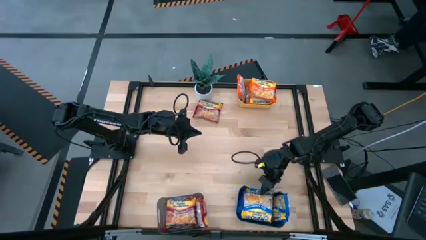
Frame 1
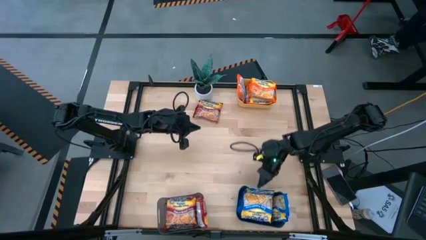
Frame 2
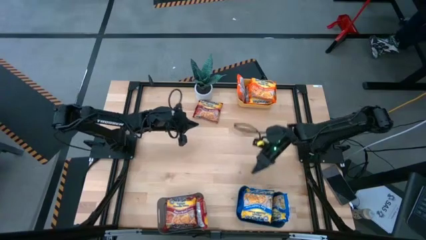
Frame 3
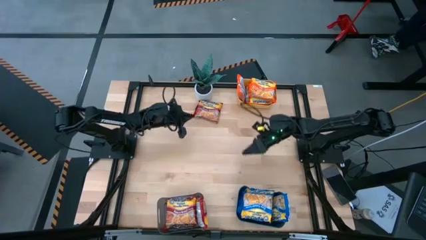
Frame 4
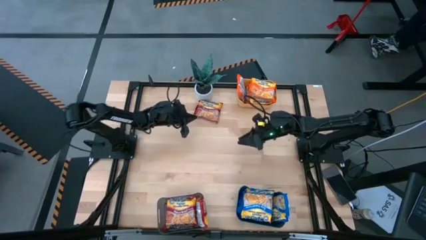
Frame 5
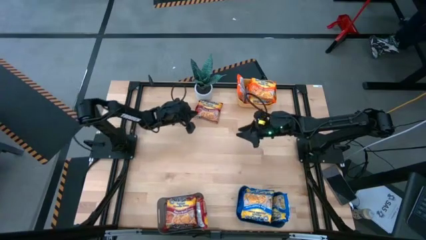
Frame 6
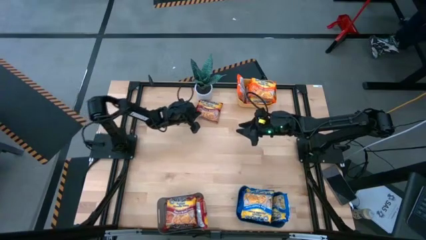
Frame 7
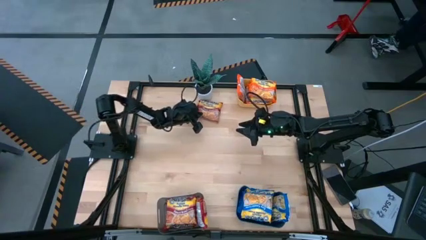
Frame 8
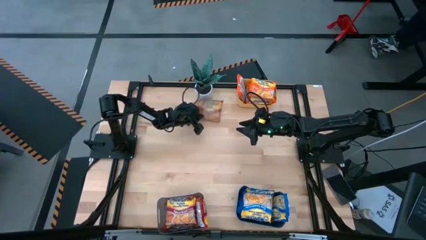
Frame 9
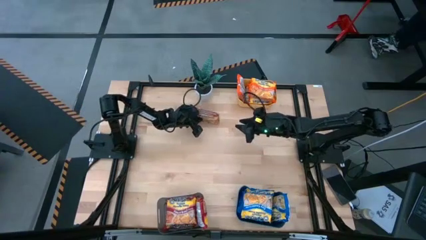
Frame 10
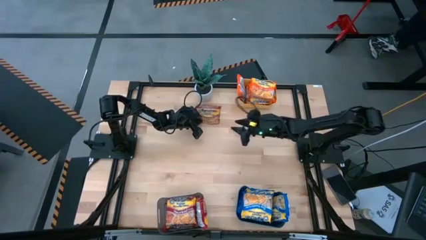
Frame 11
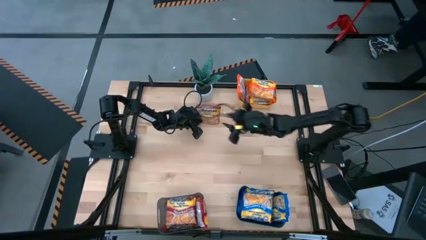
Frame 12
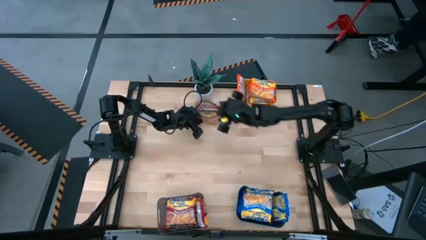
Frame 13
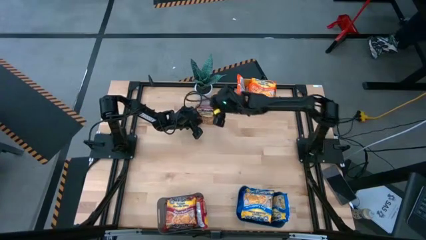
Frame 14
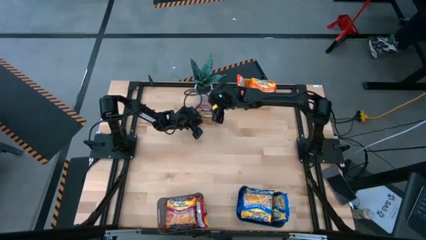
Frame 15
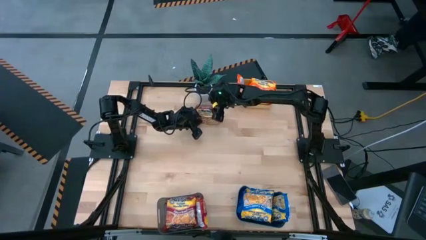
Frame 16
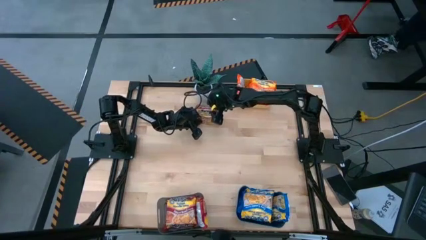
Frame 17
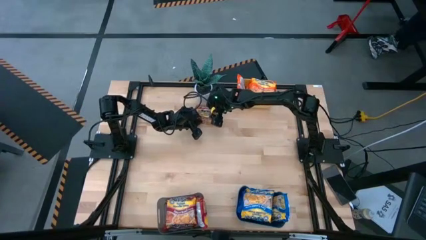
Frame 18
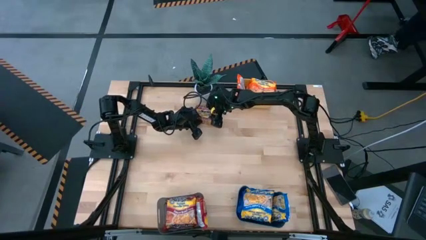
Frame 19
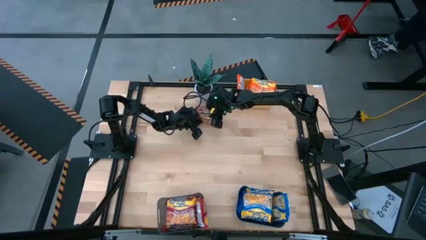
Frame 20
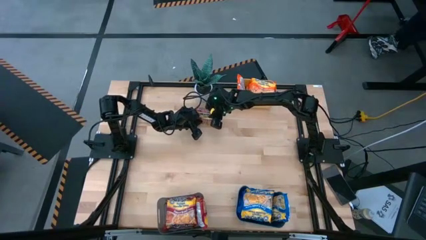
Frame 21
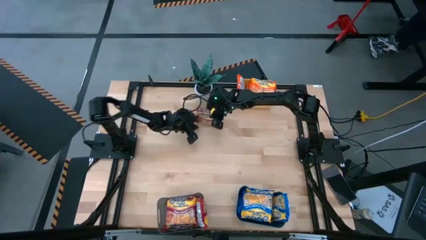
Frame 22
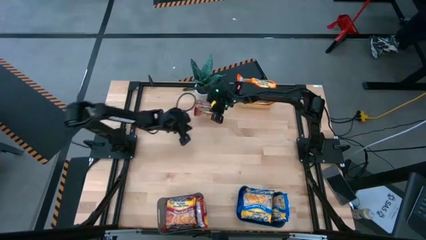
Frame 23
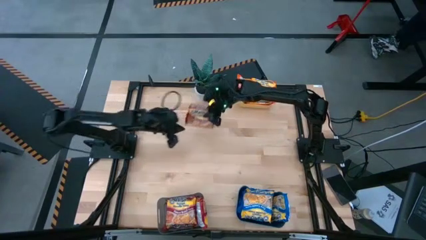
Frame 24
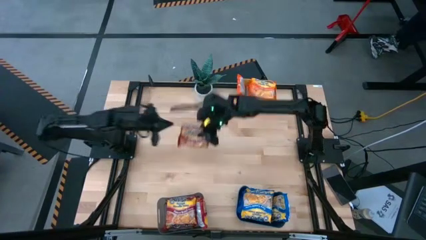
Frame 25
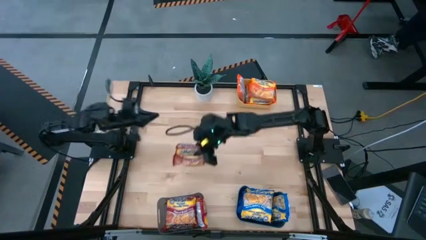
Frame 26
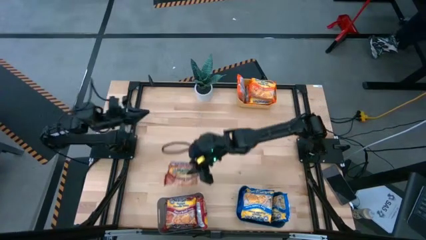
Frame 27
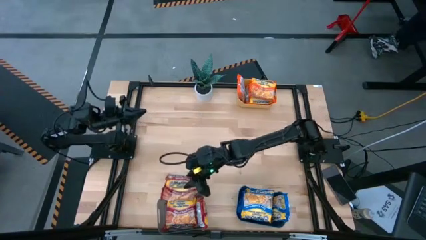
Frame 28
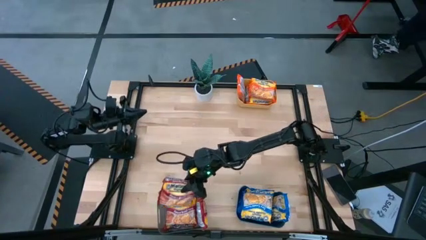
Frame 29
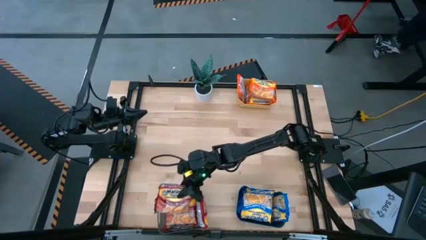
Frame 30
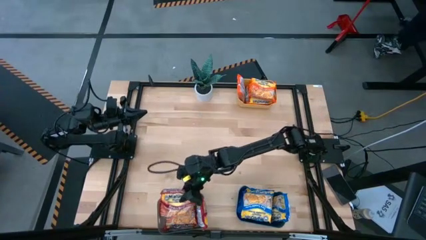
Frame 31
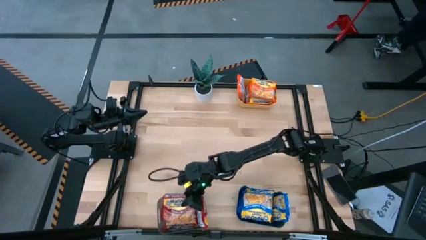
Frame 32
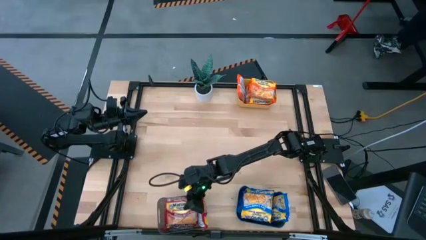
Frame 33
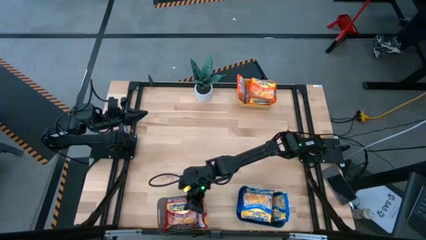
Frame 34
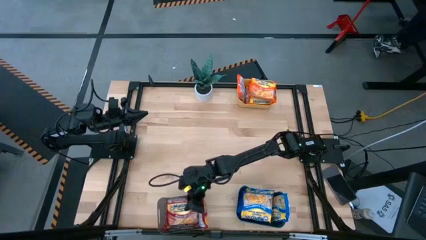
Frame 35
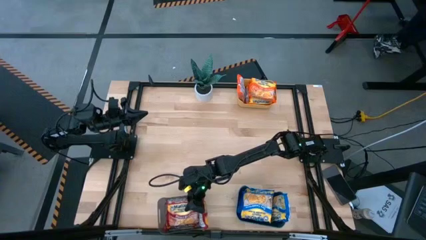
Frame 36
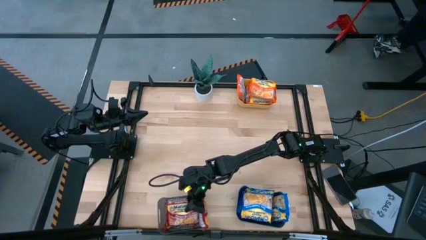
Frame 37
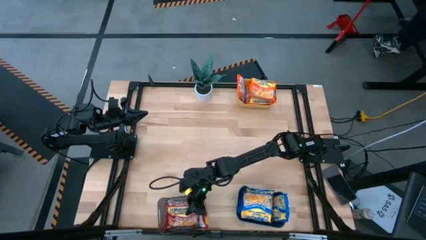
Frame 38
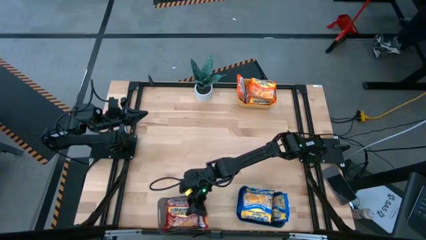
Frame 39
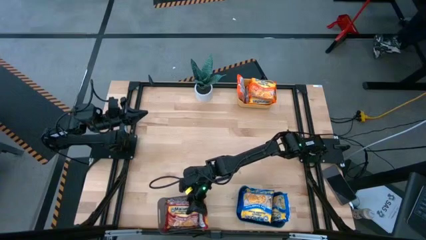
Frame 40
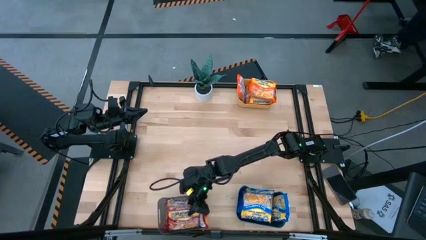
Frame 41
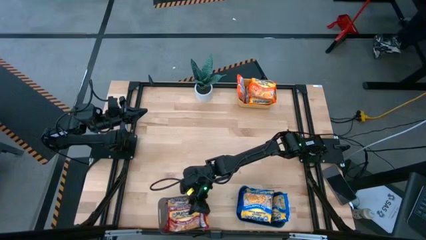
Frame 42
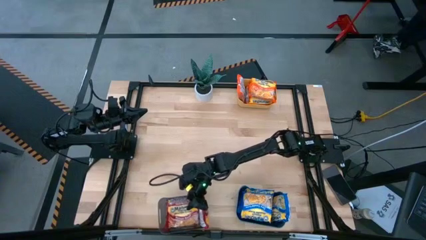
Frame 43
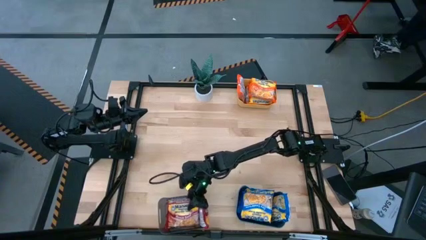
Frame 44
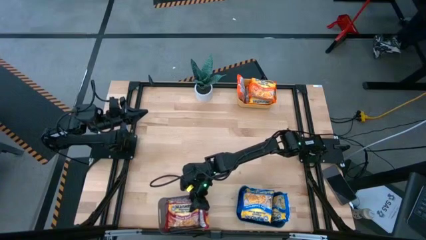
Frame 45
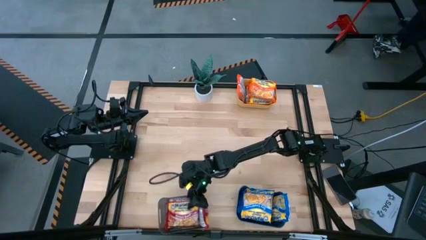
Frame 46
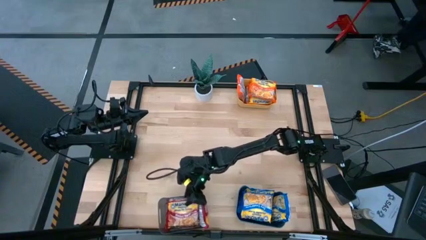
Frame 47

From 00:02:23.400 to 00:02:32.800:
Task: Sort Maruchan noodles
Put the red noodle pack into the black bin

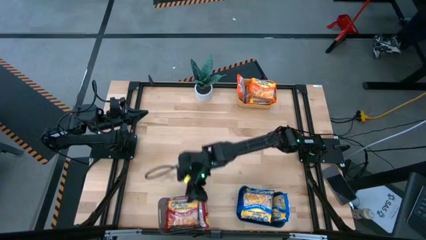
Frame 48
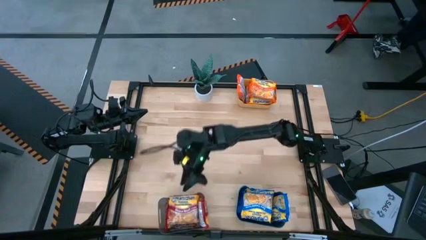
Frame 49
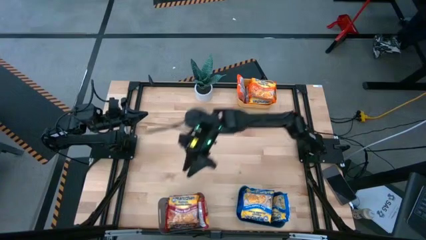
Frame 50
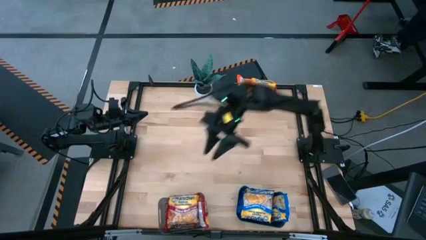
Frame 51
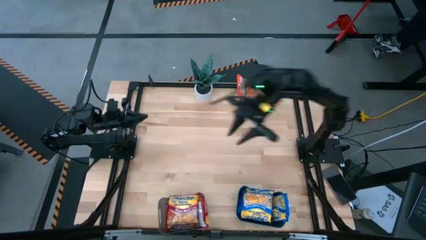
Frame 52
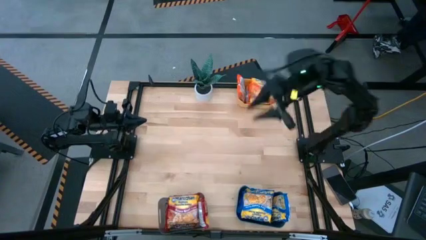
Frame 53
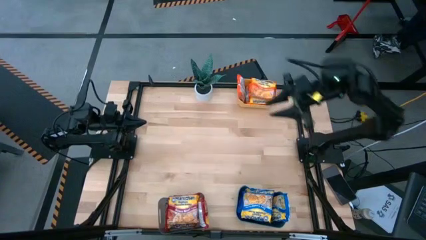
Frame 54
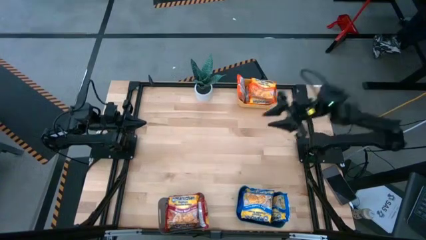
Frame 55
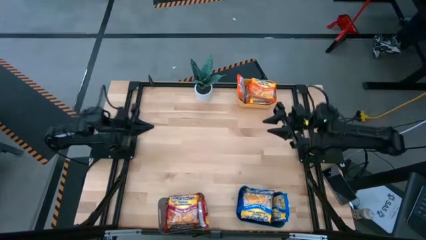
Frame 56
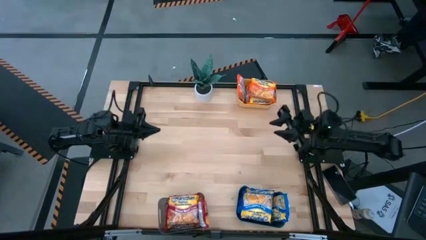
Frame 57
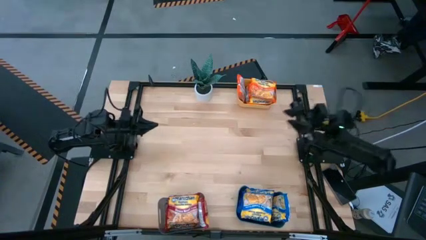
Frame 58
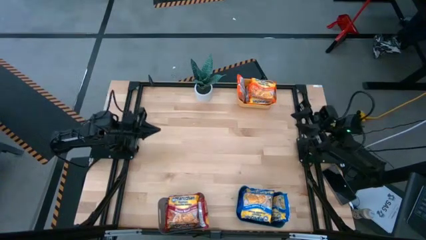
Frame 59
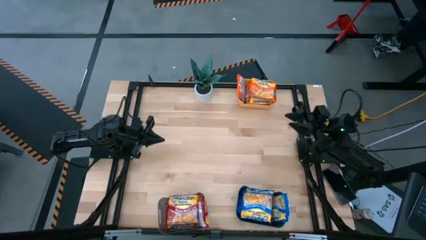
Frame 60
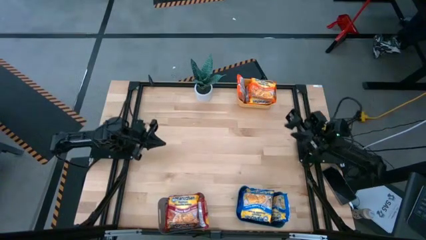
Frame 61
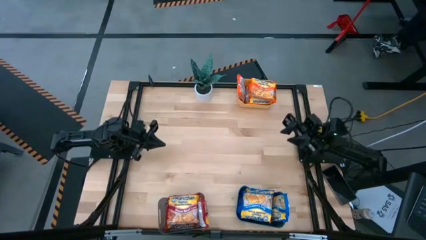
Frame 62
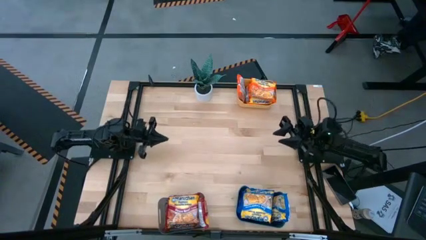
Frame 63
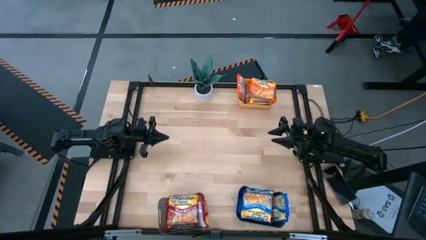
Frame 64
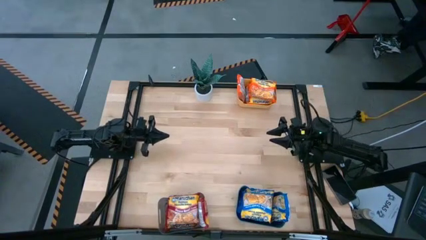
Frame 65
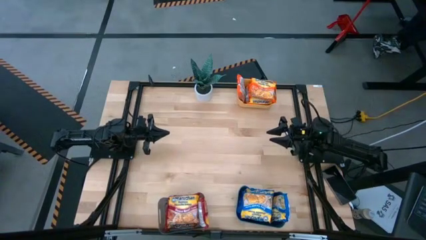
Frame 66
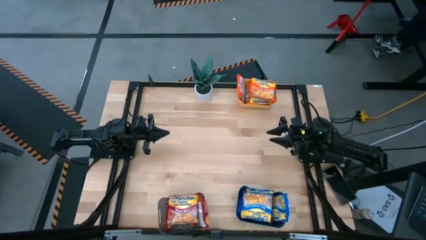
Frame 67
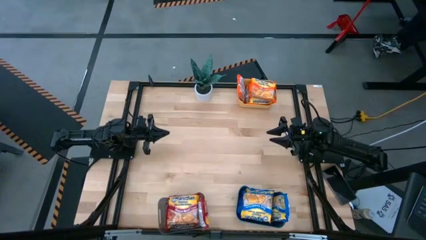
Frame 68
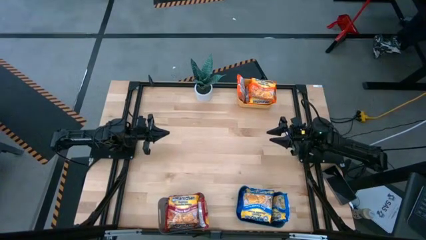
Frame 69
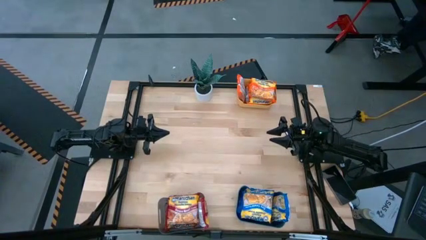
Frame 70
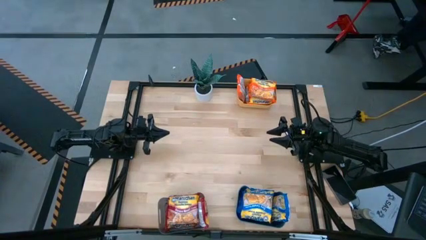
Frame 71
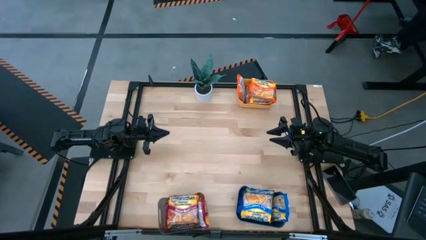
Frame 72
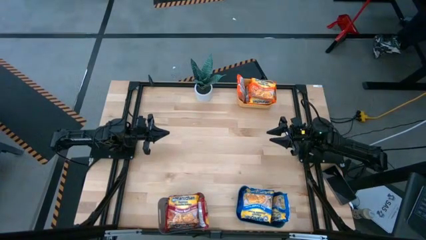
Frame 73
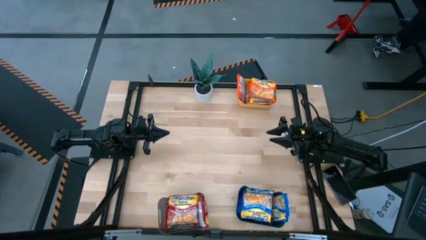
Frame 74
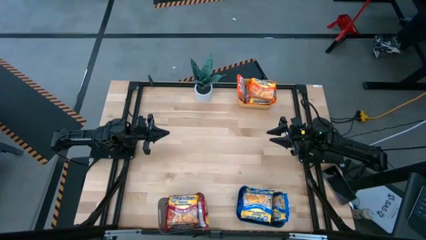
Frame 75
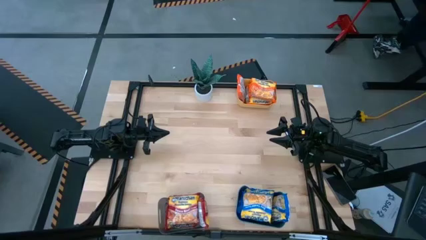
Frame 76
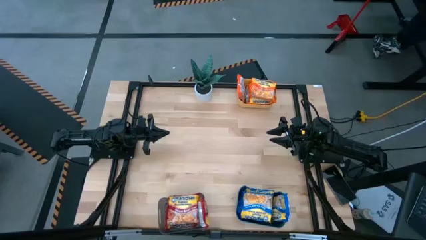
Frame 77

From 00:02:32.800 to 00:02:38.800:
Return to Home Position
